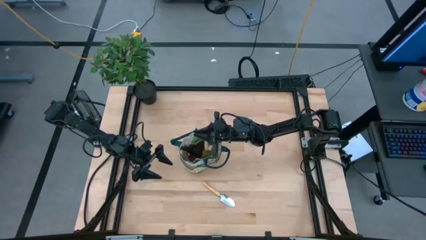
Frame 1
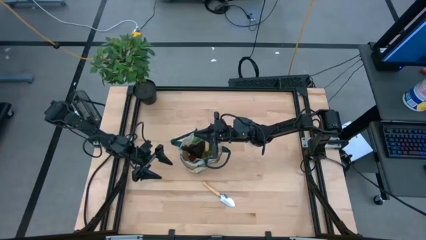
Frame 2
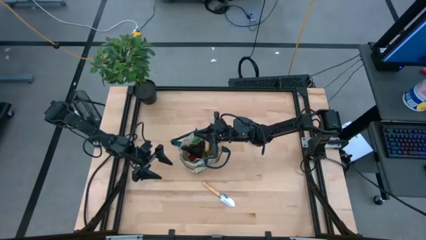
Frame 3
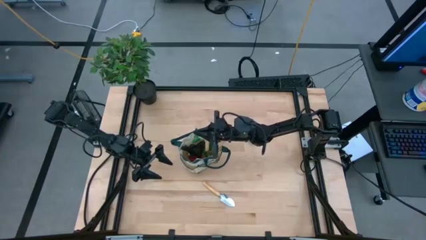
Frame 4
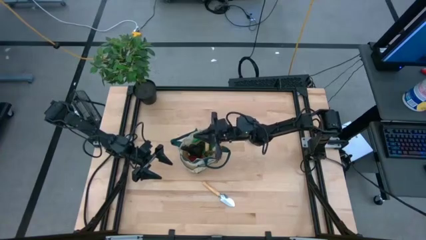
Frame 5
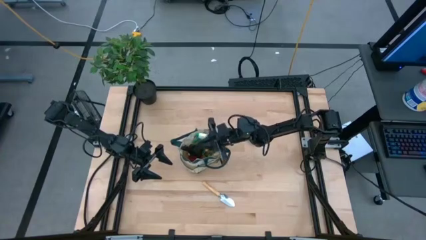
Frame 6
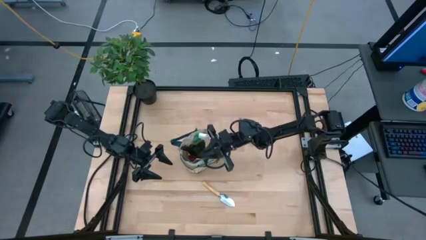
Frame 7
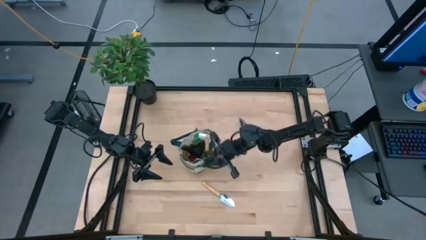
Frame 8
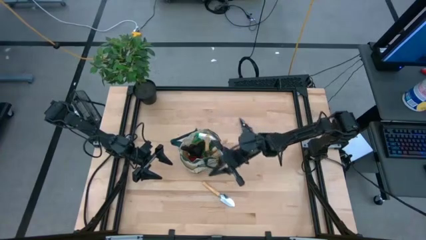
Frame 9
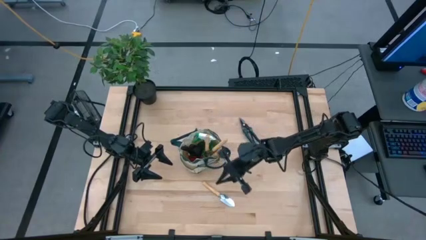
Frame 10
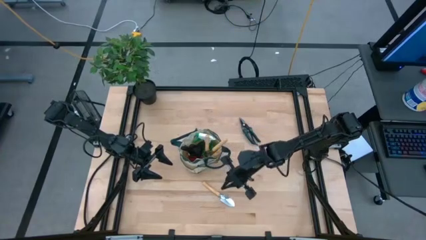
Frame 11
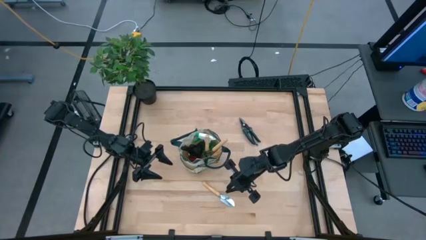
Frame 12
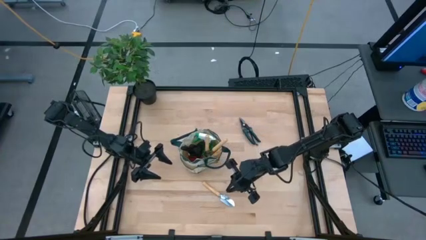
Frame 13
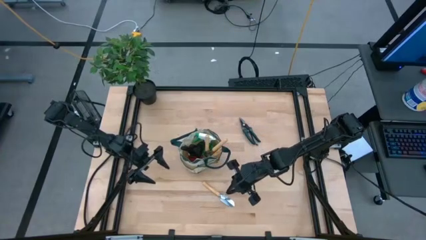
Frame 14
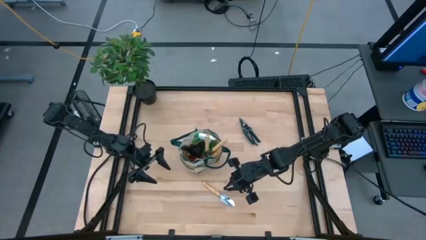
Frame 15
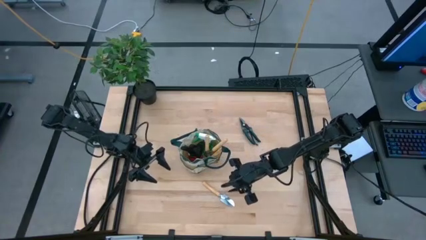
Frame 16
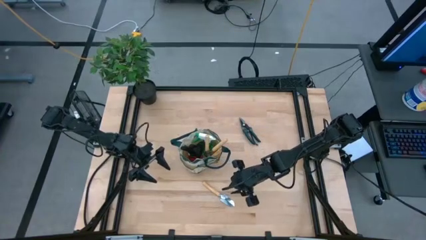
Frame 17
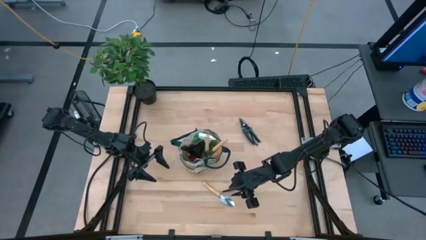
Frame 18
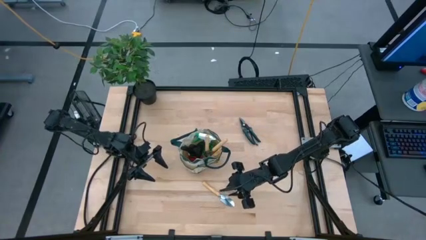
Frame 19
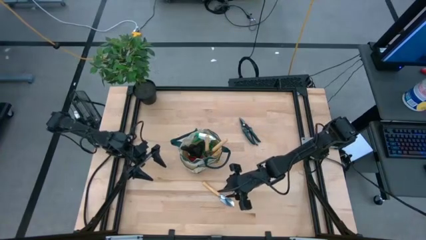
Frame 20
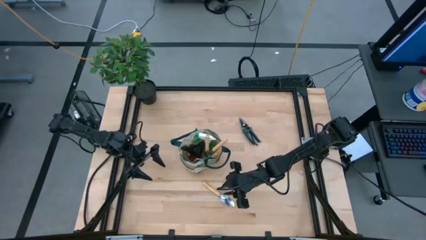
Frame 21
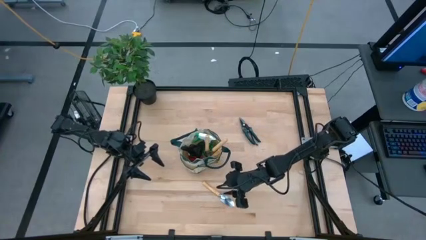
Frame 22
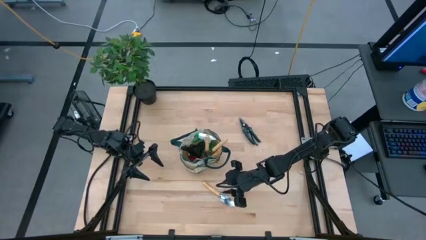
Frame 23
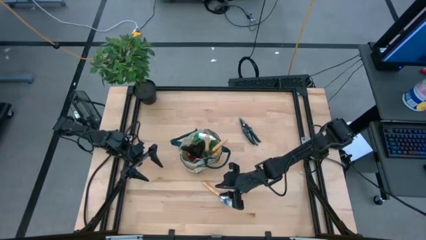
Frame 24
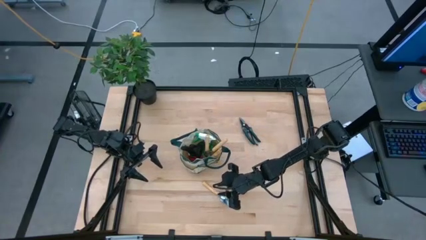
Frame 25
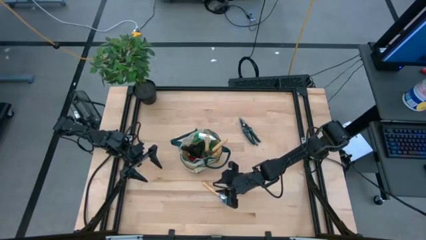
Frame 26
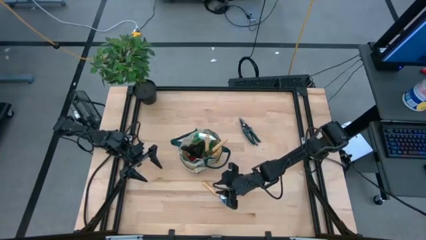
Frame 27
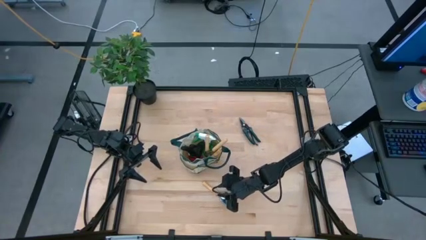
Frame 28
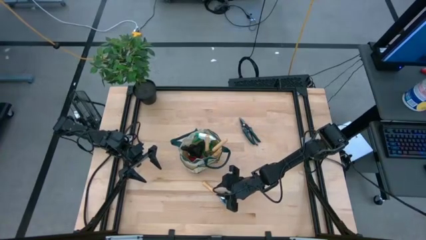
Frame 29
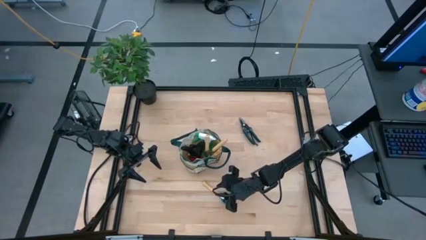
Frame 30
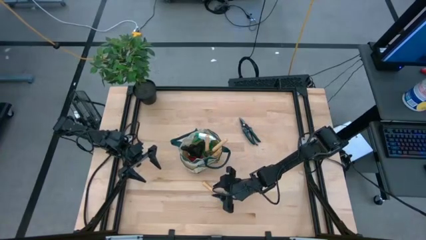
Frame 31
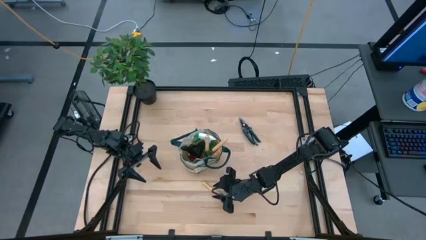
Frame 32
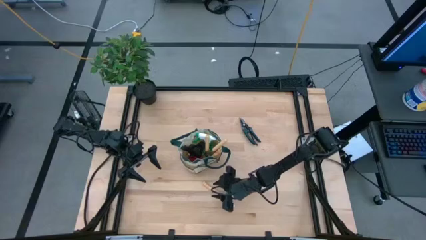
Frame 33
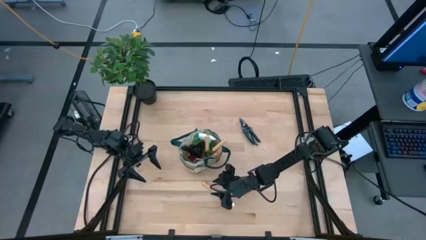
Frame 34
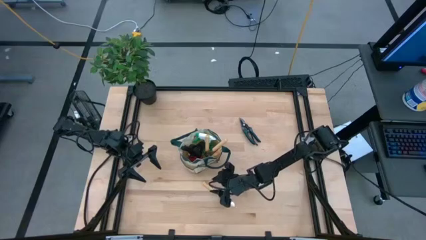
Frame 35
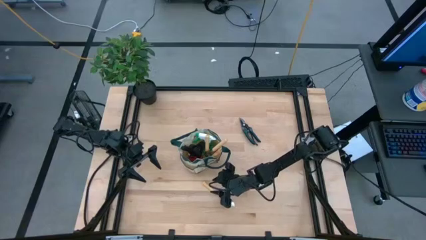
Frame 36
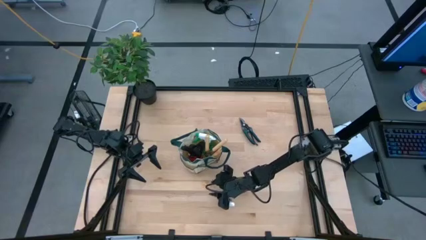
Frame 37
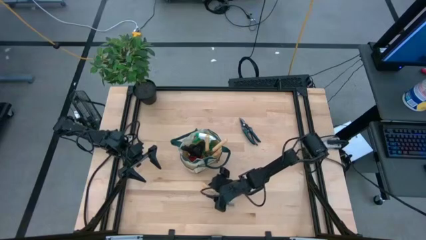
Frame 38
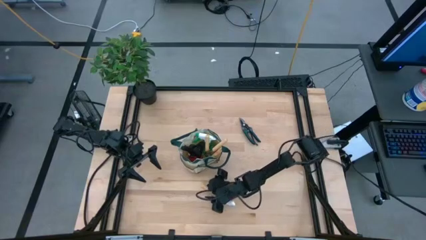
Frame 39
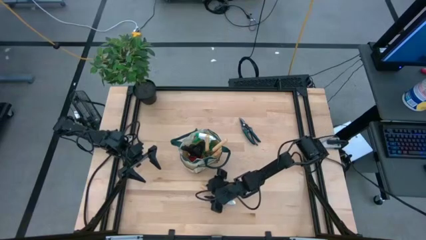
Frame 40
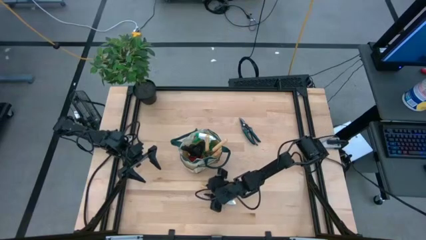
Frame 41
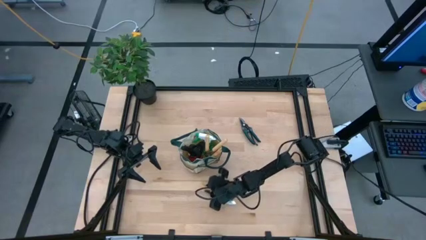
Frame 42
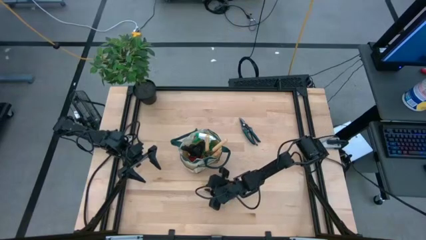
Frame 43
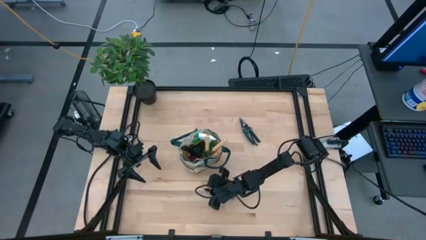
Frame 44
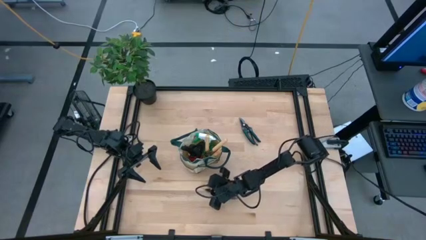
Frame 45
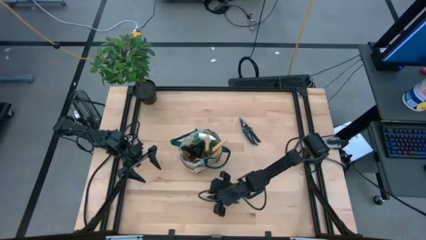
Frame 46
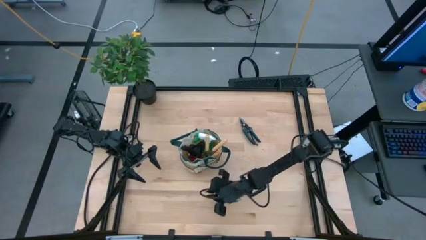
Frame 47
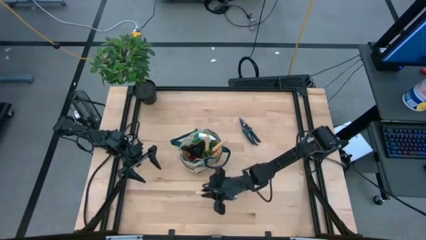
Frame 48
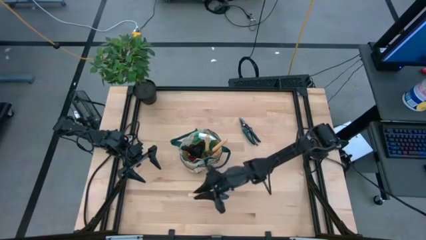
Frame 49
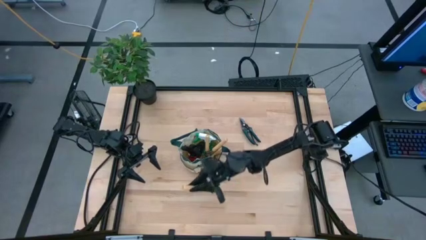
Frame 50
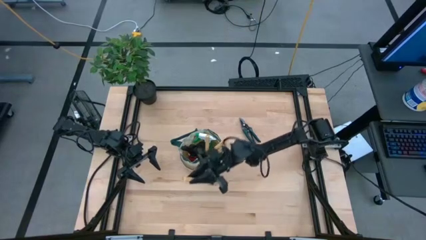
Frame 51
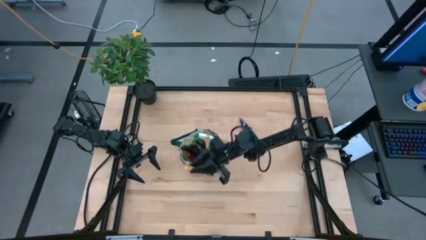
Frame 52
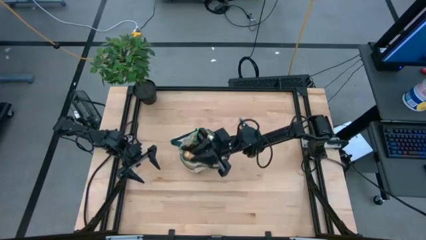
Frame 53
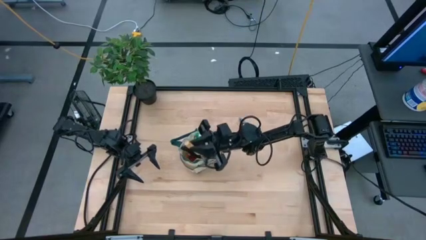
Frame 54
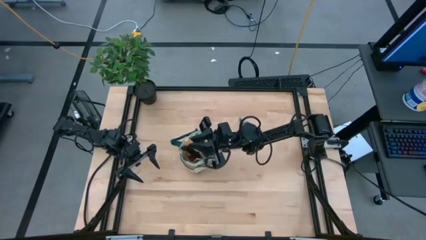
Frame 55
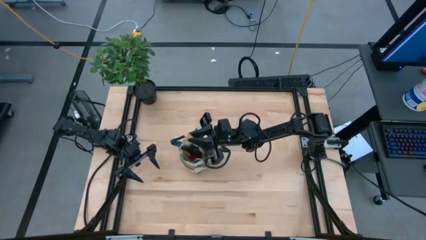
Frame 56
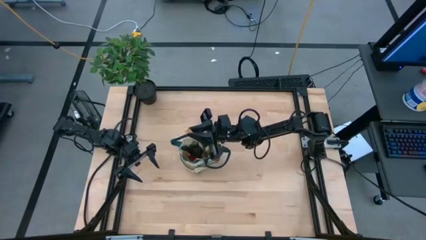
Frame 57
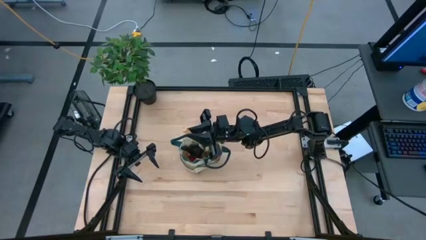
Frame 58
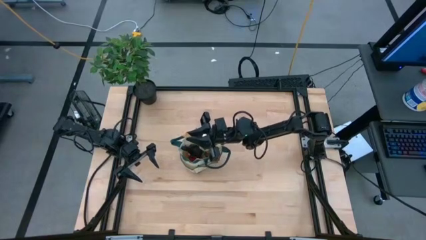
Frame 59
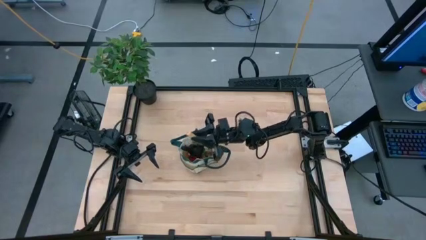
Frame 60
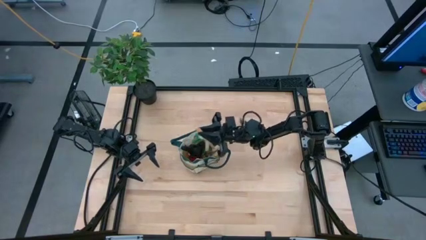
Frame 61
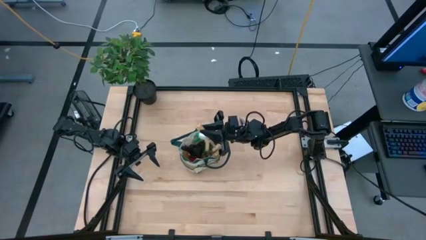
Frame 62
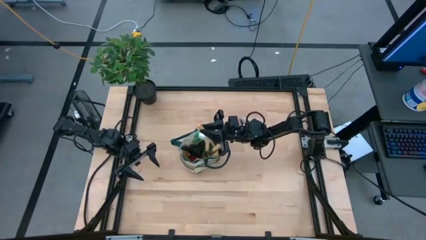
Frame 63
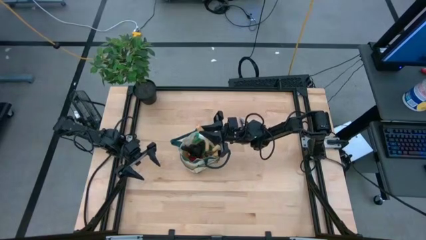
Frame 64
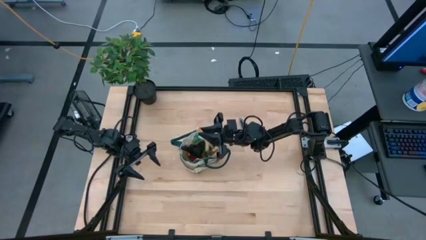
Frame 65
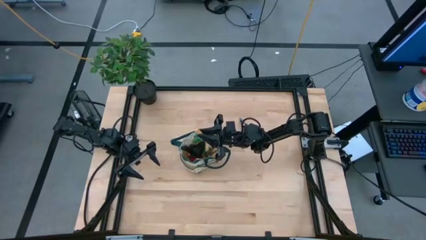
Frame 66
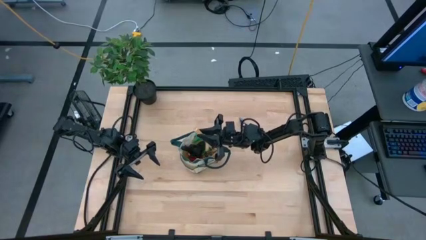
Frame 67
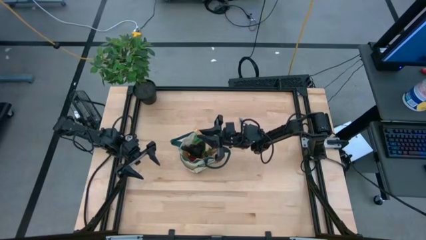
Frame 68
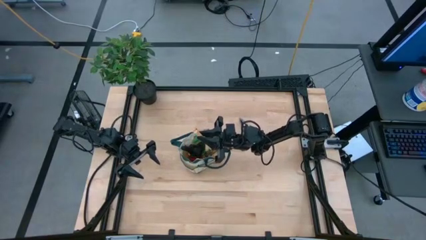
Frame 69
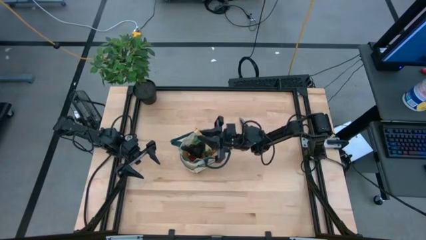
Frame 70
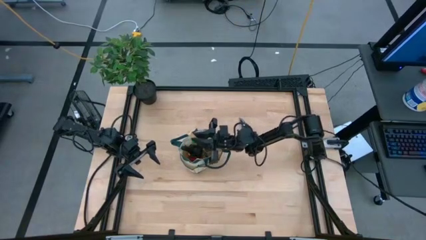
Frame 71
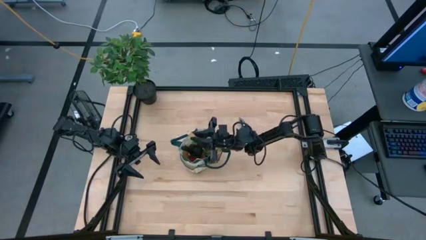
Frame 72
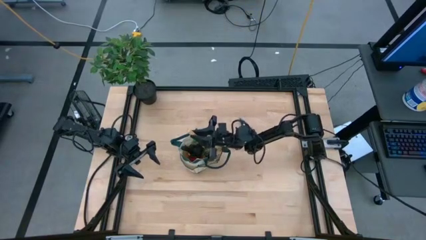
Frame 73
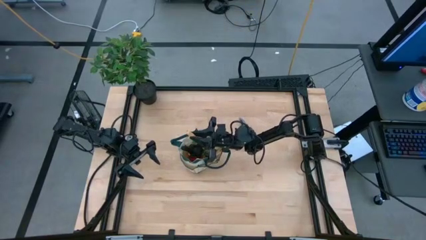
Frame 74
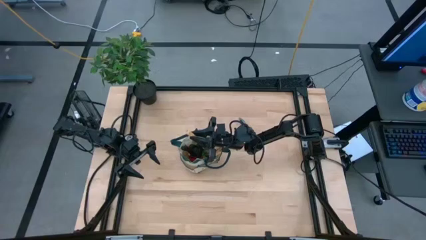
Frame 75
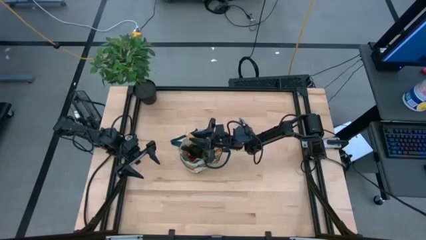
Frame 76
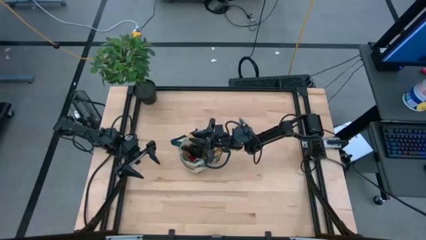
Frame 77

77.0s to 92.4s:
Task: Pick & Place Garden tools in Gardening bag
Put the brown trowel into the gardening bag
